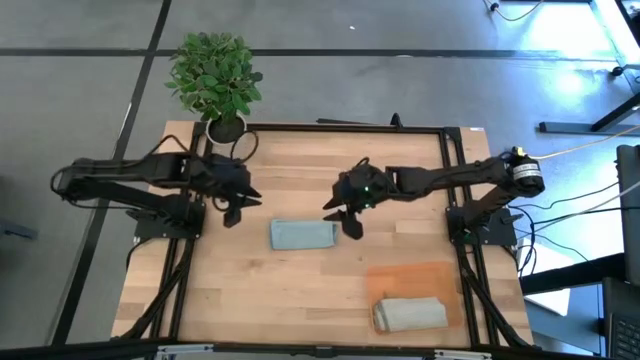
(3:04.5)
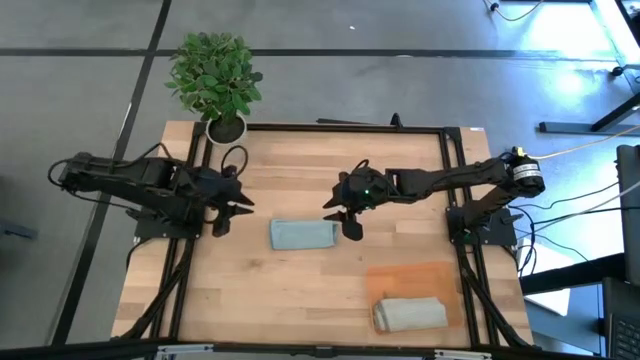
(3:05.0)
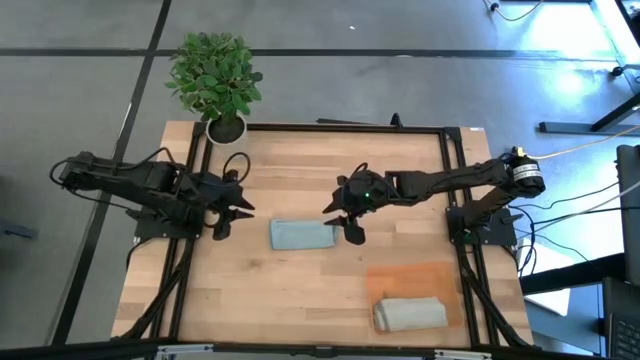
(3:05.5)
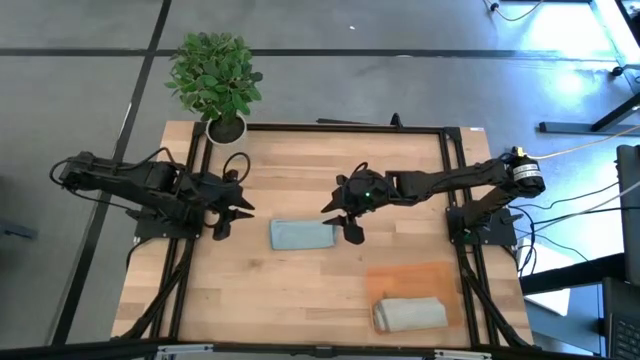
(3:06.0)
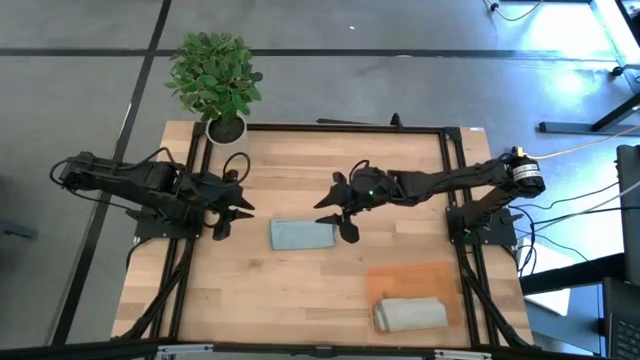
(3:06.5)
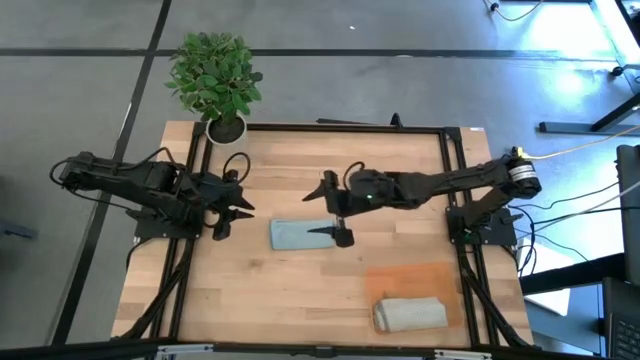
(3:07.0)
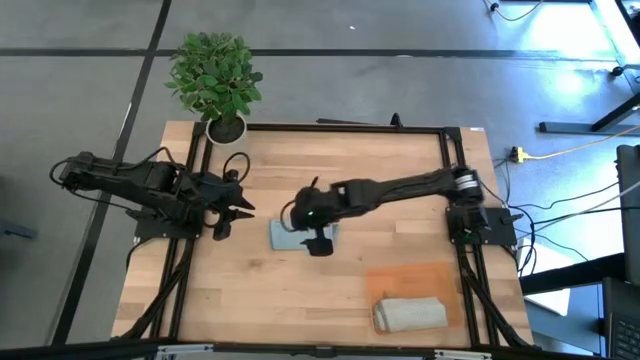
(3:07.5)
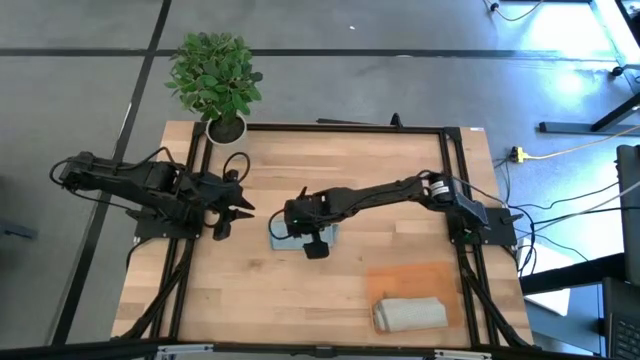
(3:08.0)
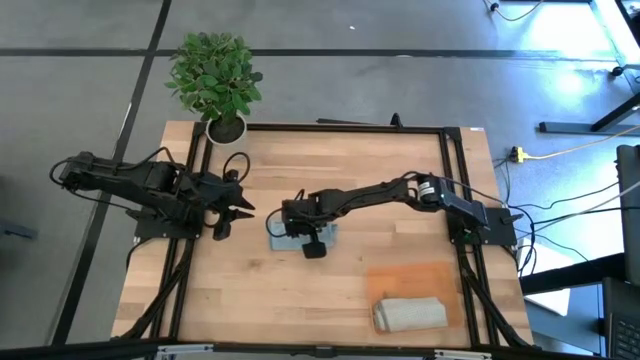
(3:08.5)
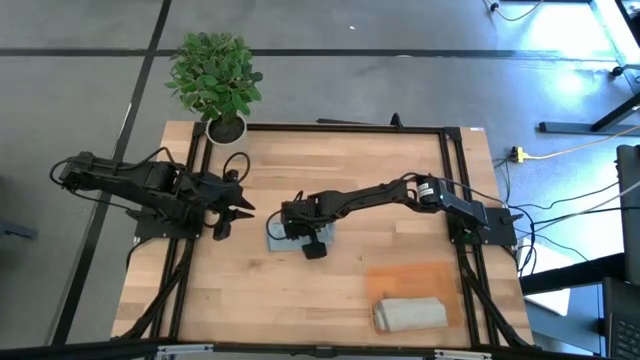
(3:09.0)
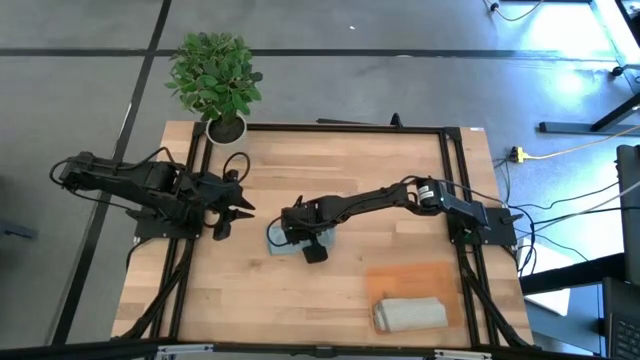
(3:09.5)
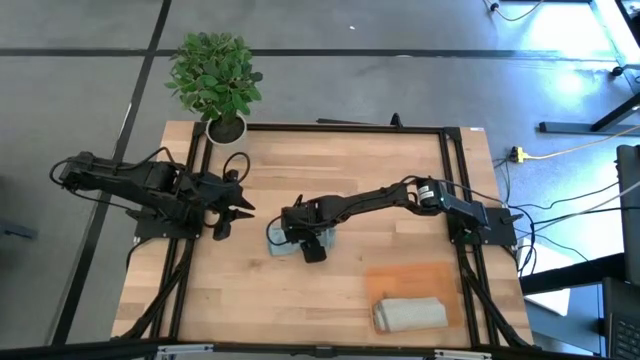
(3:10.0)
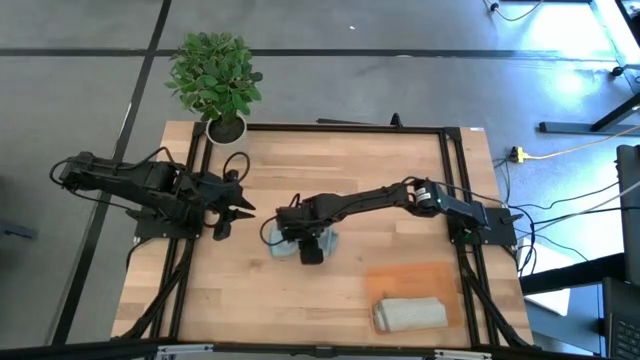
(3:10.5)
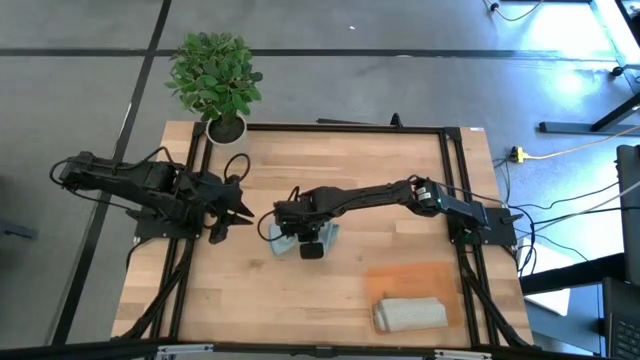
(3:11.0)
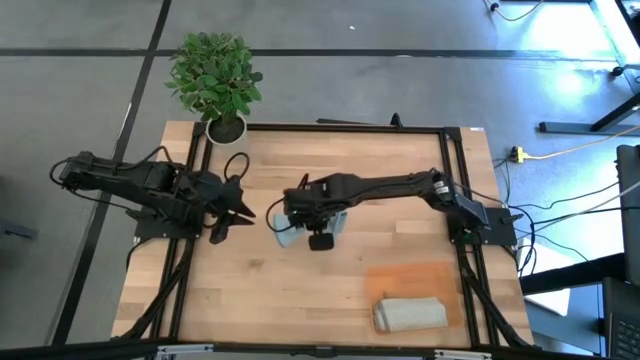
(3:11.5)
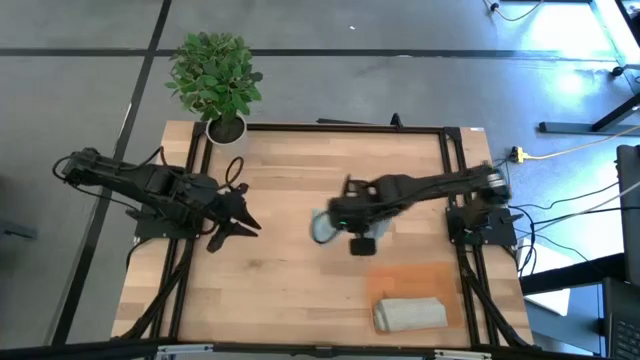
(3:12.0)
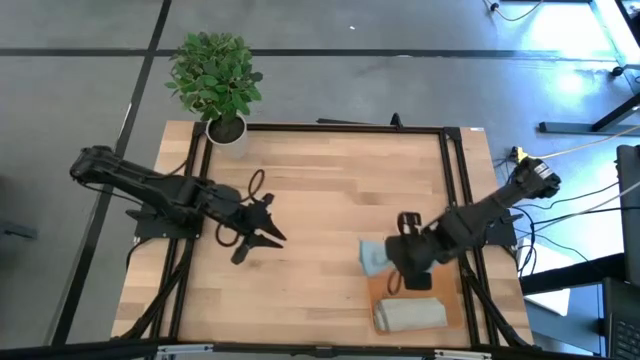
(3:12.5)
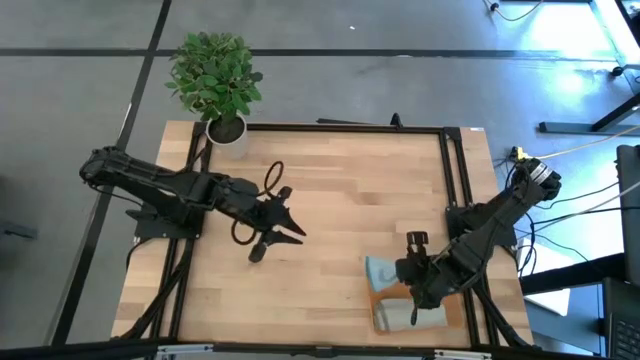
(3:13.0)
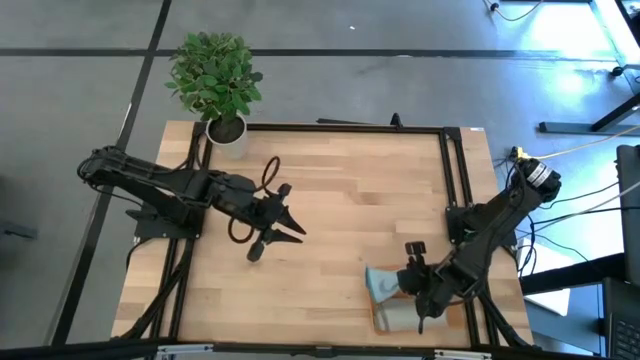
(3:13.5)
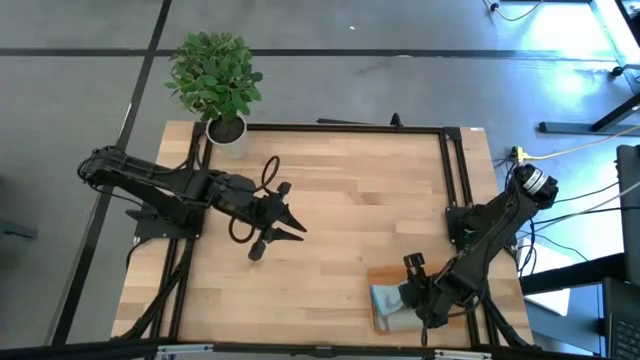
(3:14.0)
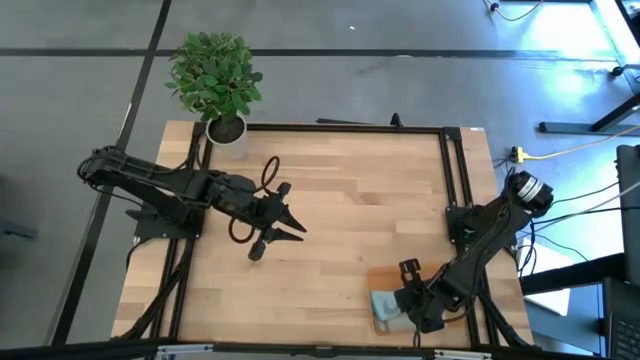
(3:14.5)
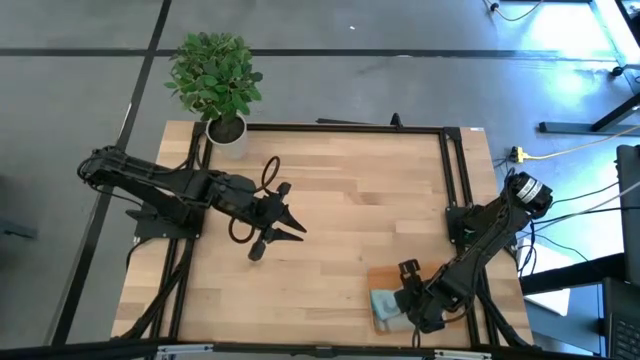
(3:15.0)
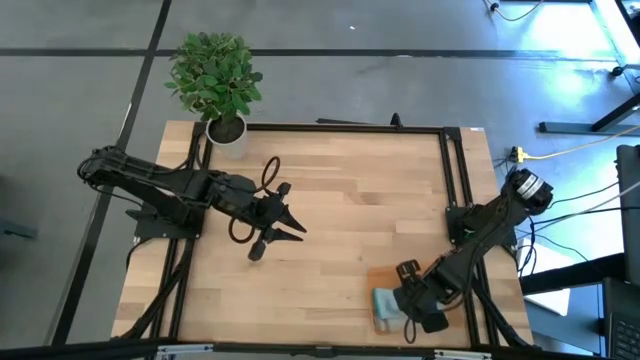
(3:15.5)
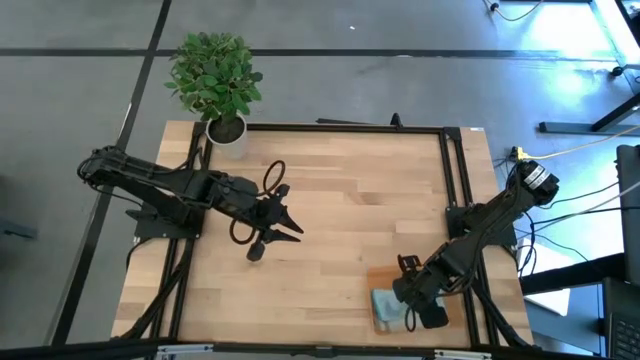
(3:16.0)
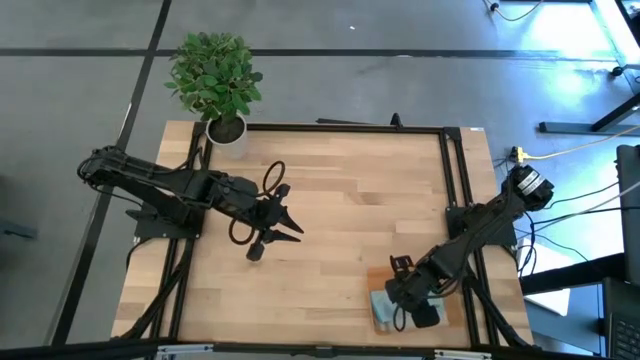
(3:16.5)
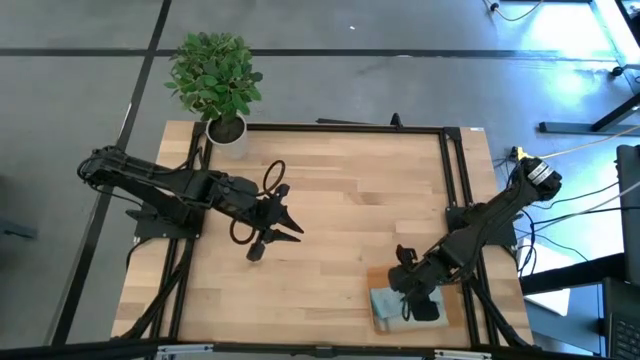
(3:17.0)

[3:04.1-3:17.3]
Task: Roll microfiber towels into tight, uniform cylinder then place into a basket
Put the rolled light blue microfiber towel into the orange bin

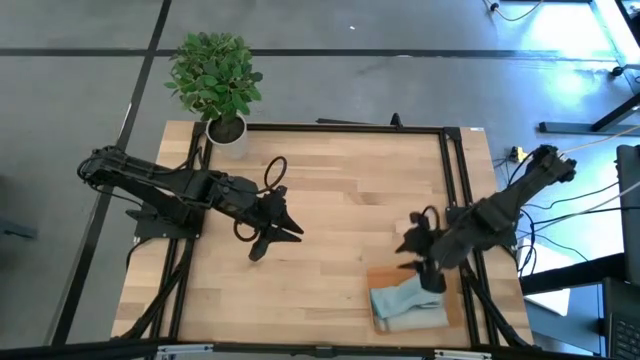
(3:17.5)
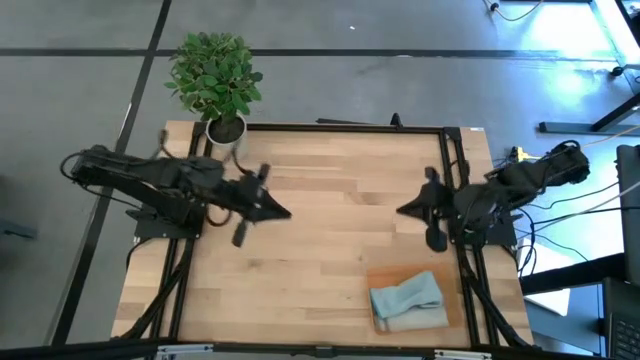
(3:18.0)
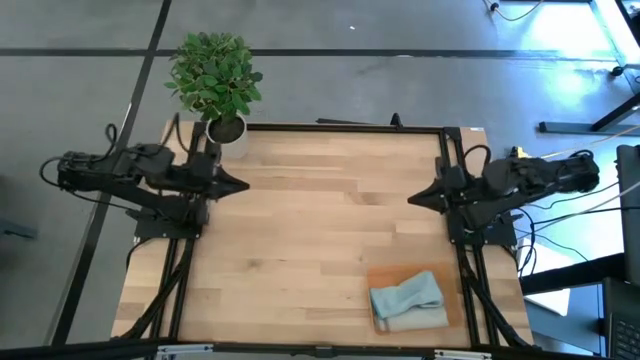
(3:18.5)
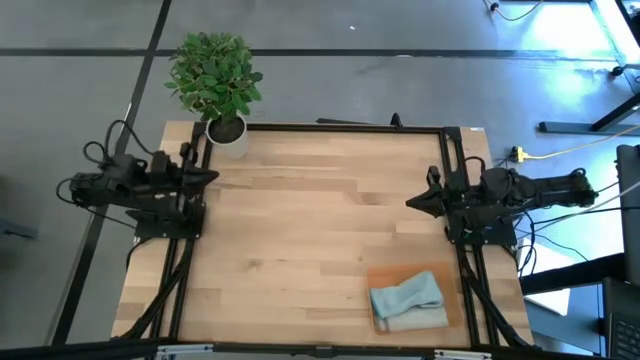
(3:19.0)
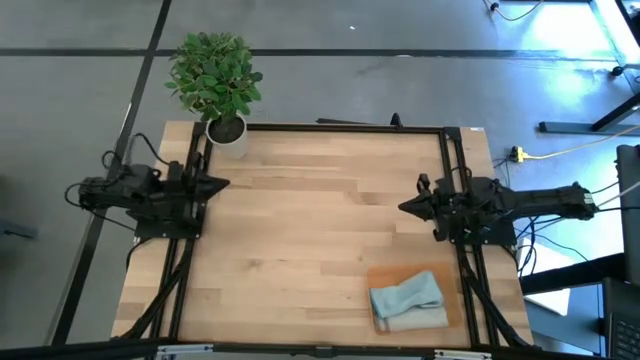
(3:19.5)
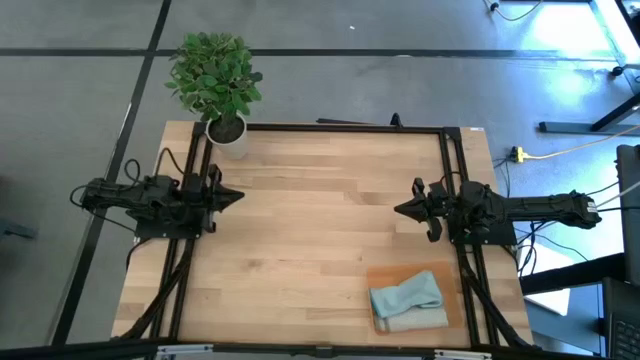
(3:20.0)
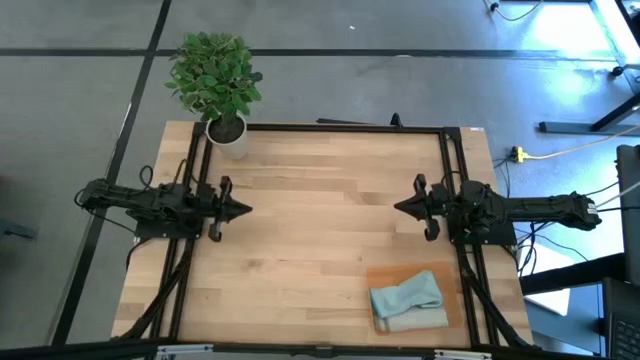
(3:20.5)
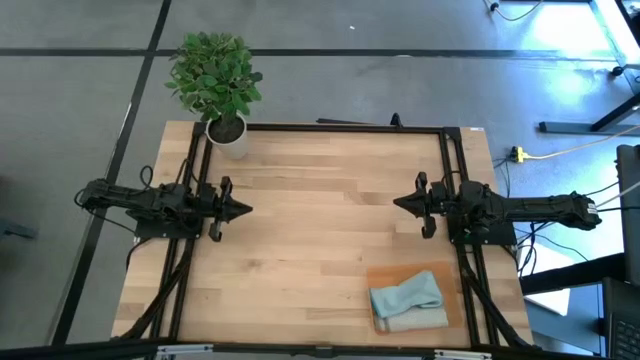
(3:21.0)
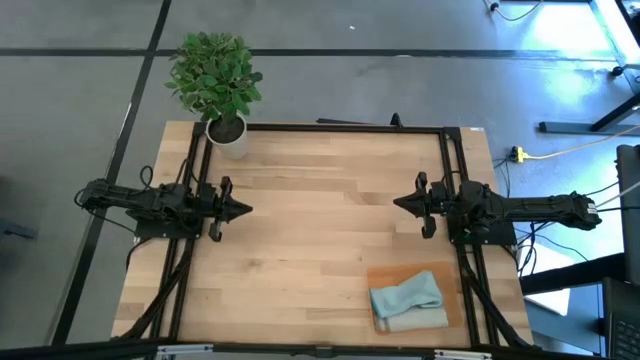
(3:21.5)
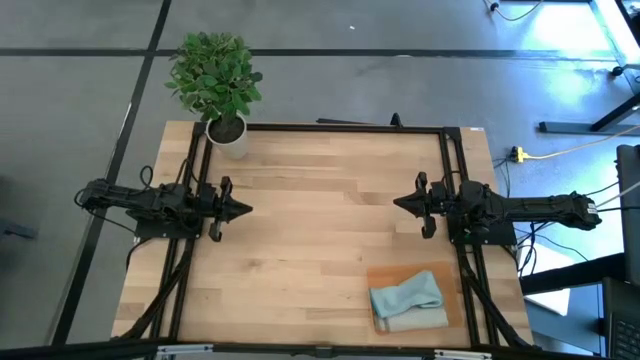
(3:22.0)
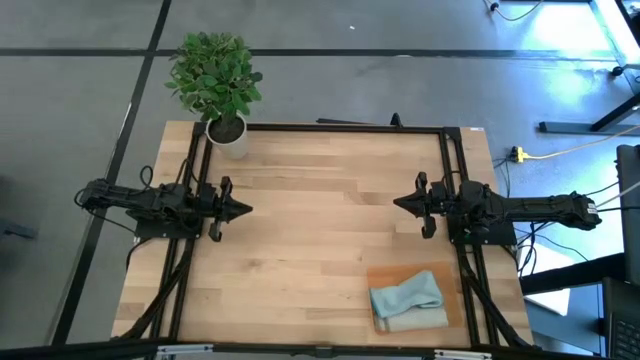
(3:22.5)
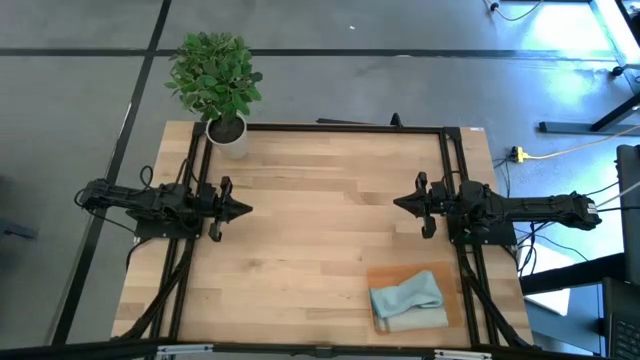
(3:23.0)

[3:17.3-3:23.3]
Return to Home Position

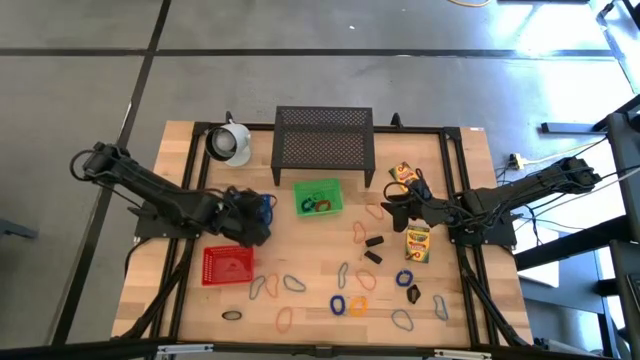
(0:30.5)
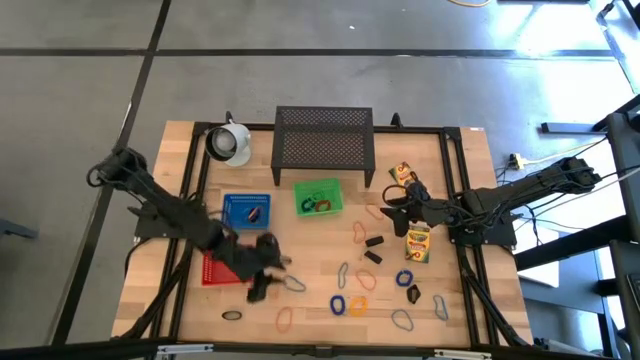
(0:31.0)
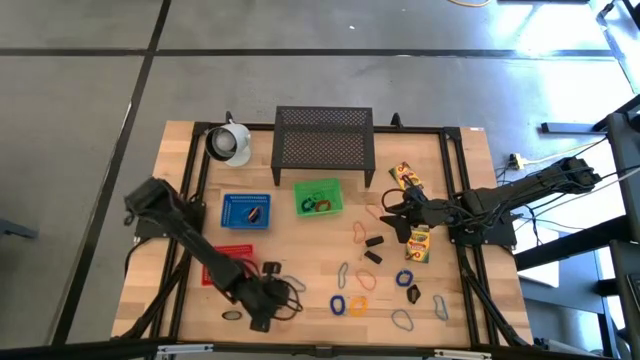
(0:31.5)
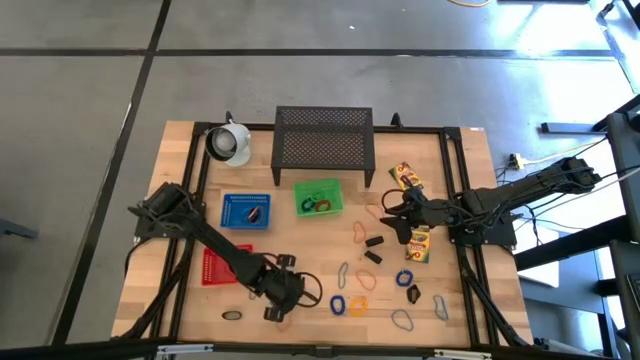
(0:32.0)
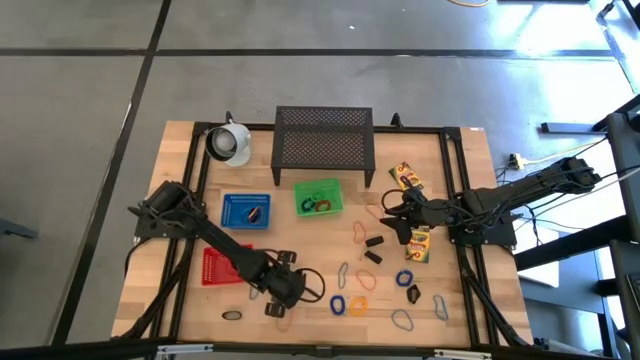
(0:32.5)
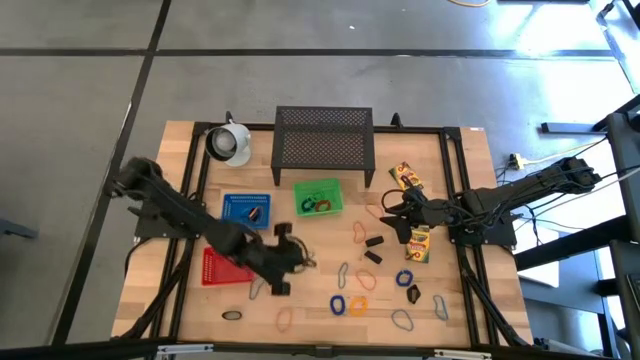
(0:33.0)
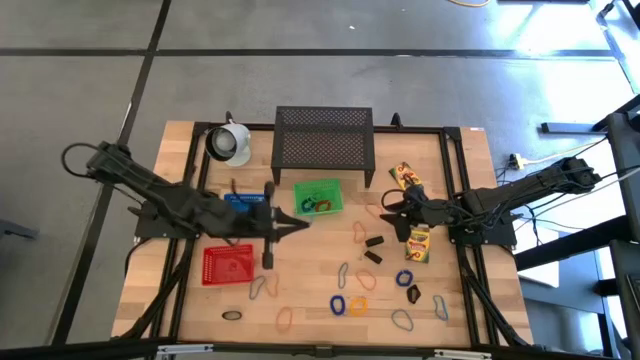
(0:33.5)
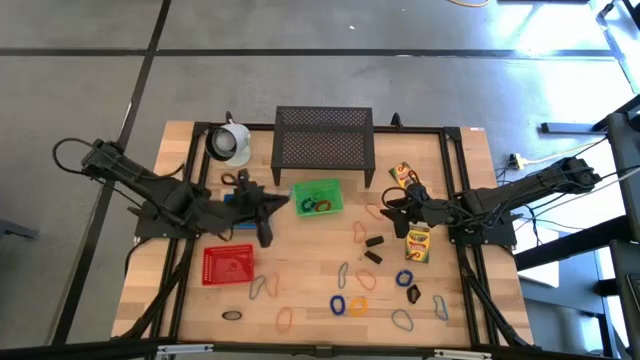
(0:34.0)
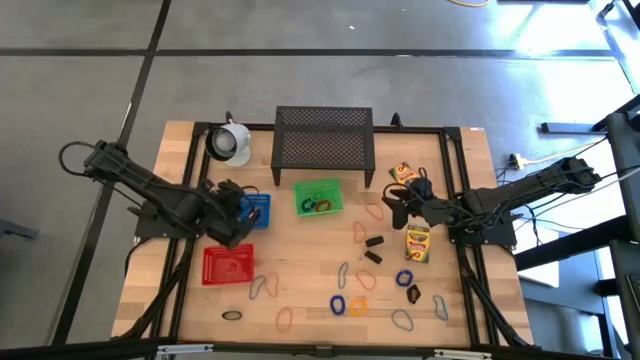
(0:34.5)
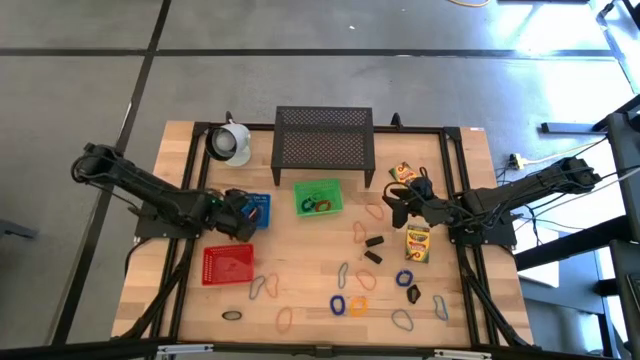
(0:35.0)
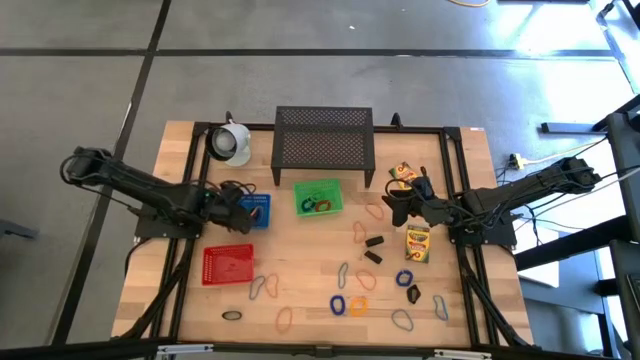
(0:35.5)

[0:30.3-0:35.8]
Task: Pick & Place Office Desk Supplies
Put the blue rubber band into the blue bin
